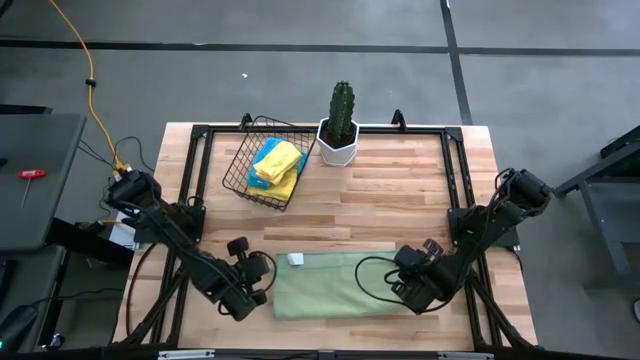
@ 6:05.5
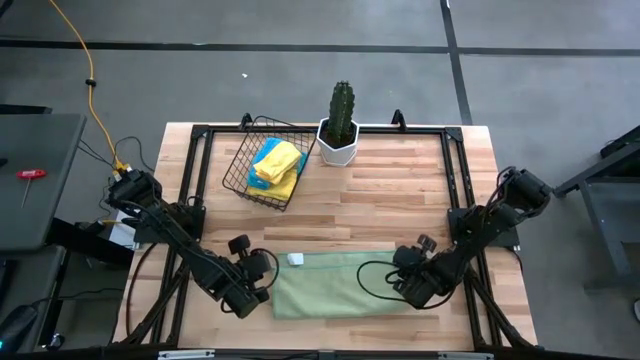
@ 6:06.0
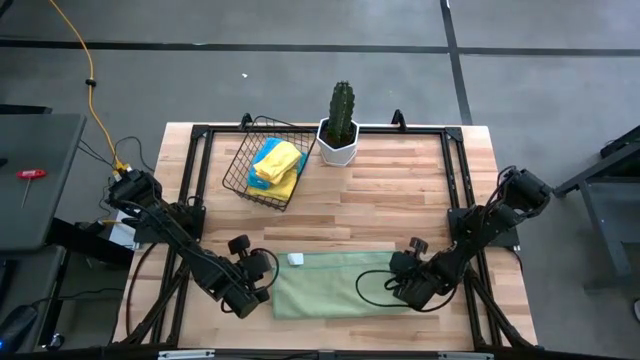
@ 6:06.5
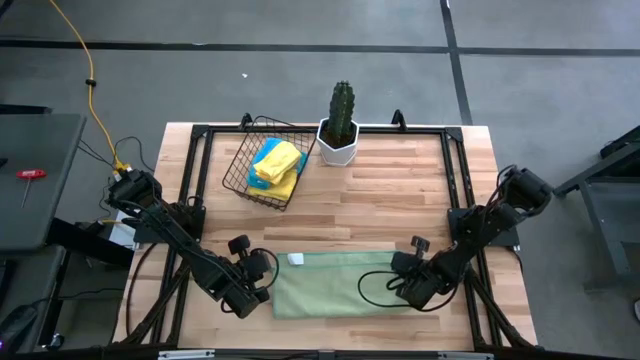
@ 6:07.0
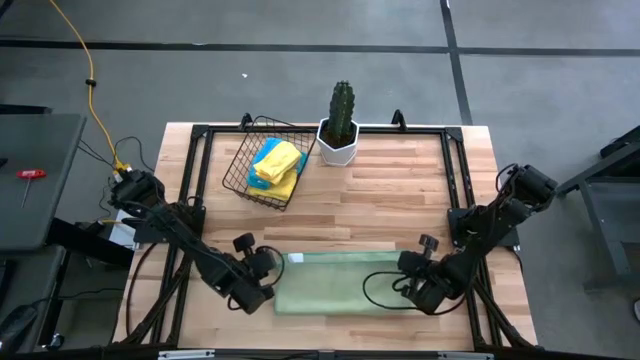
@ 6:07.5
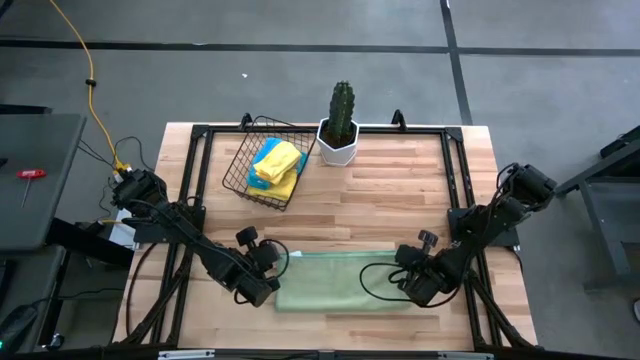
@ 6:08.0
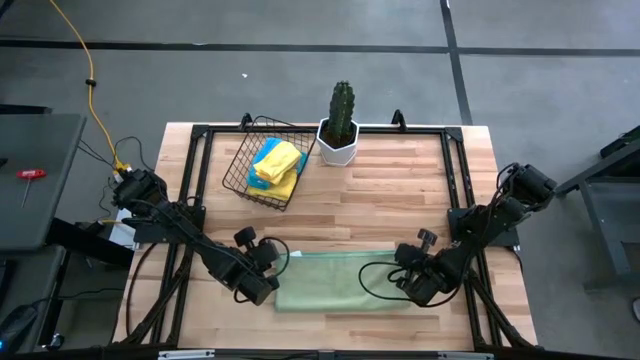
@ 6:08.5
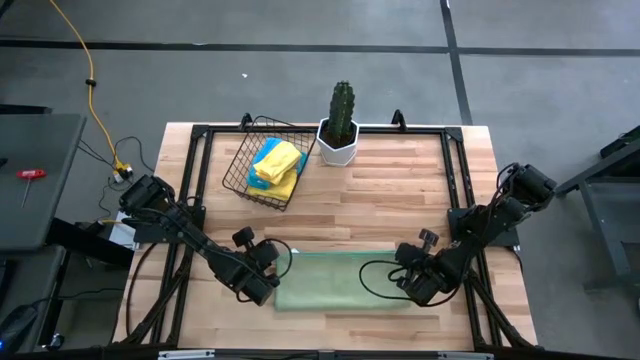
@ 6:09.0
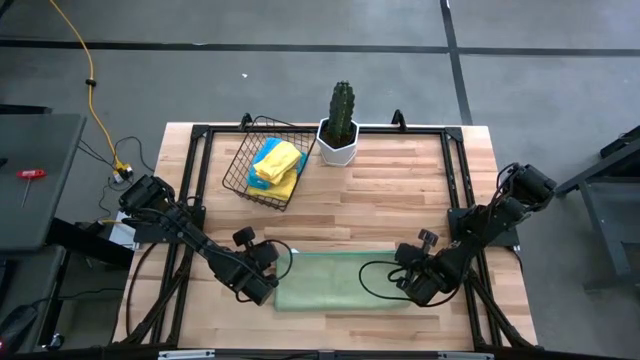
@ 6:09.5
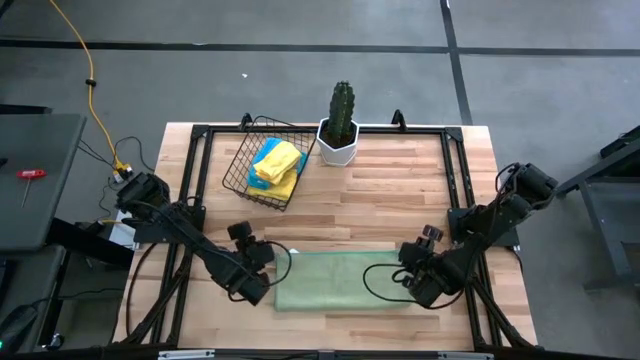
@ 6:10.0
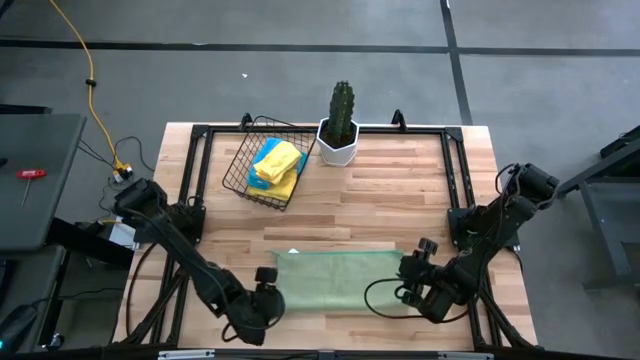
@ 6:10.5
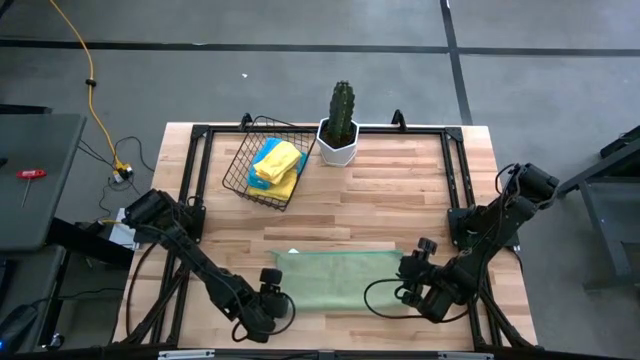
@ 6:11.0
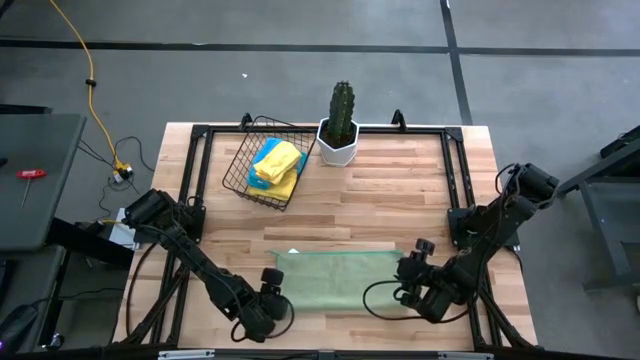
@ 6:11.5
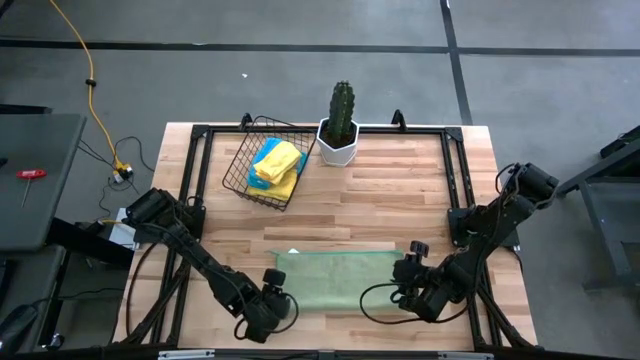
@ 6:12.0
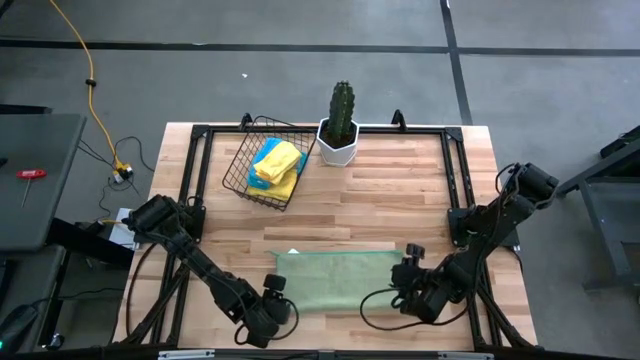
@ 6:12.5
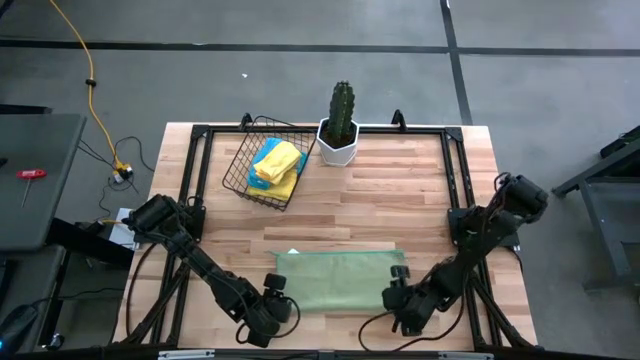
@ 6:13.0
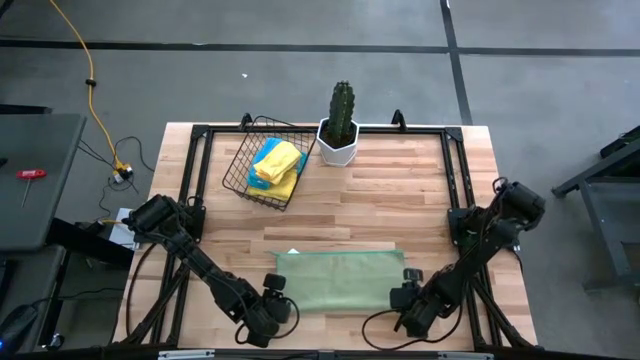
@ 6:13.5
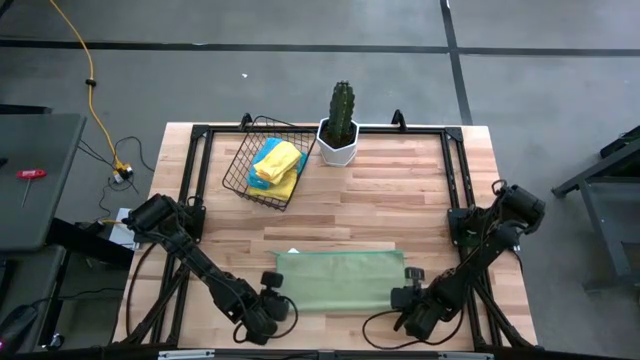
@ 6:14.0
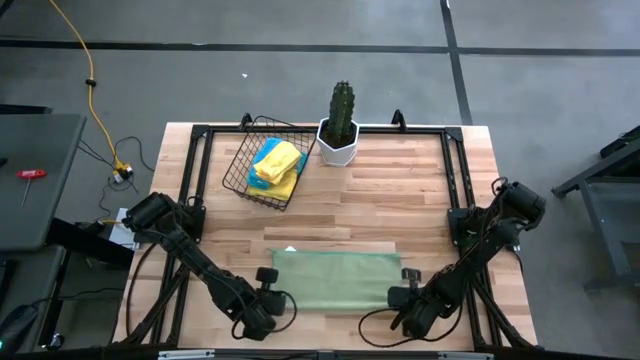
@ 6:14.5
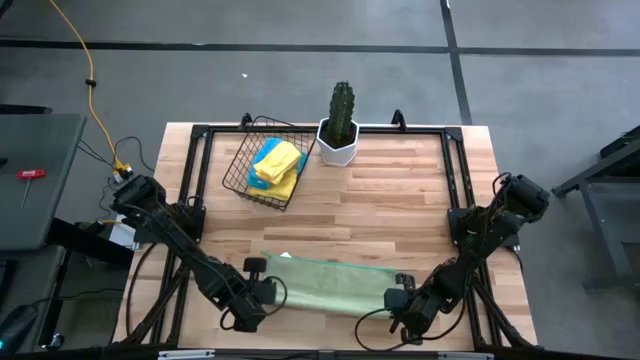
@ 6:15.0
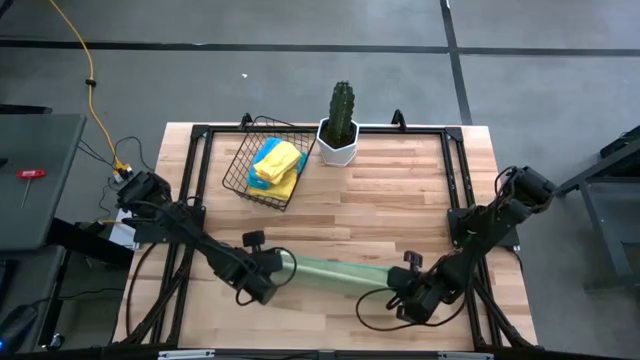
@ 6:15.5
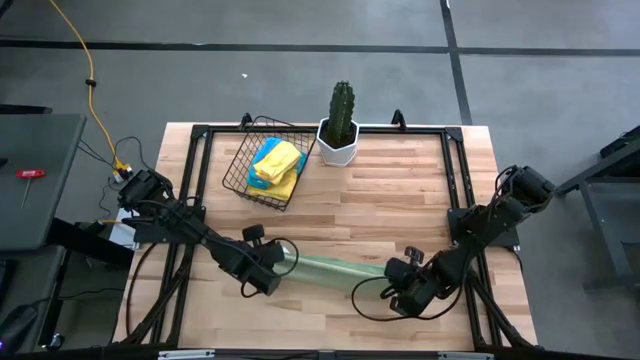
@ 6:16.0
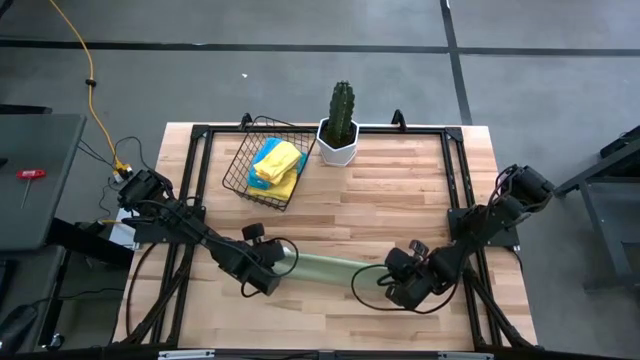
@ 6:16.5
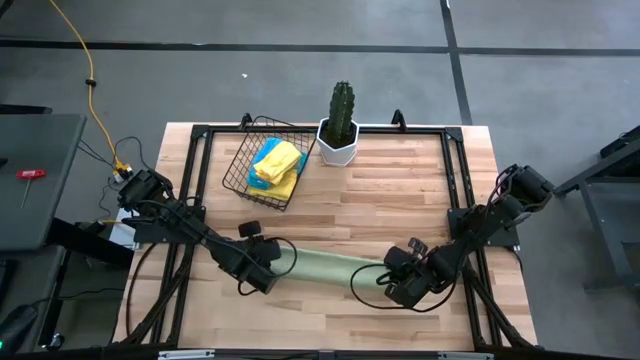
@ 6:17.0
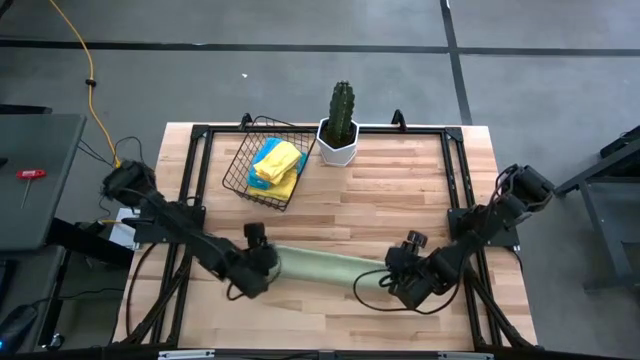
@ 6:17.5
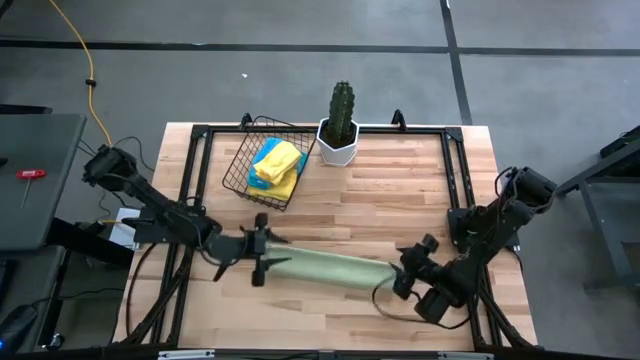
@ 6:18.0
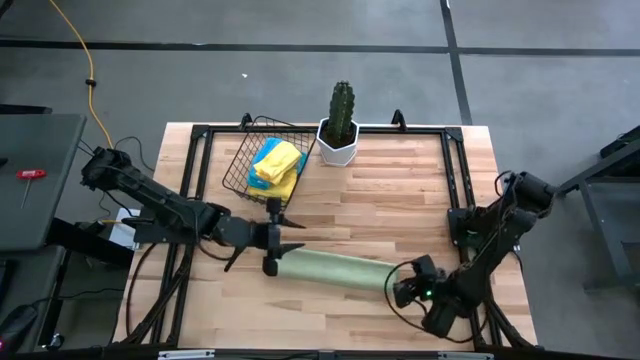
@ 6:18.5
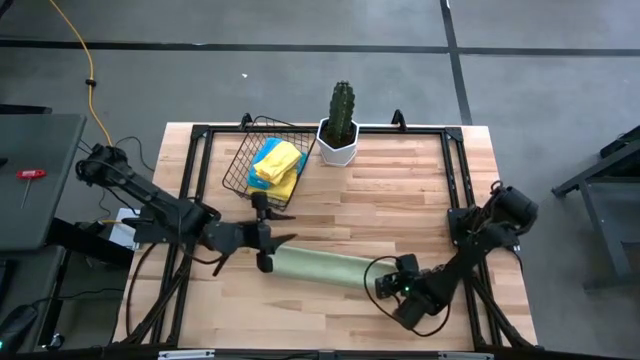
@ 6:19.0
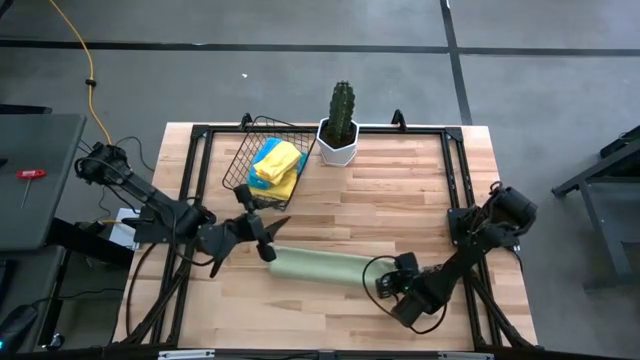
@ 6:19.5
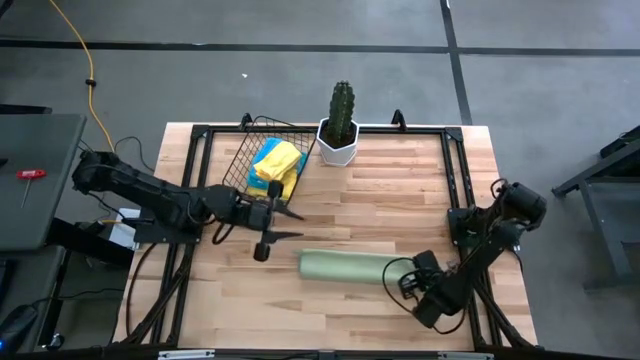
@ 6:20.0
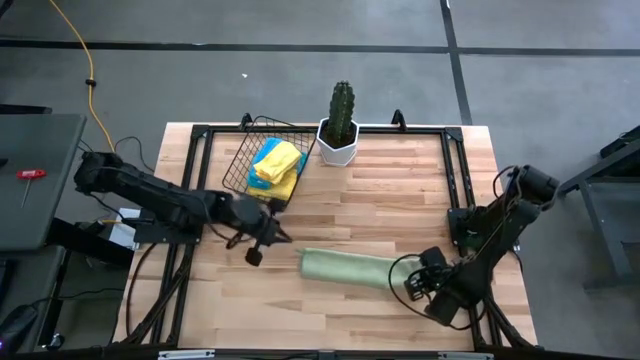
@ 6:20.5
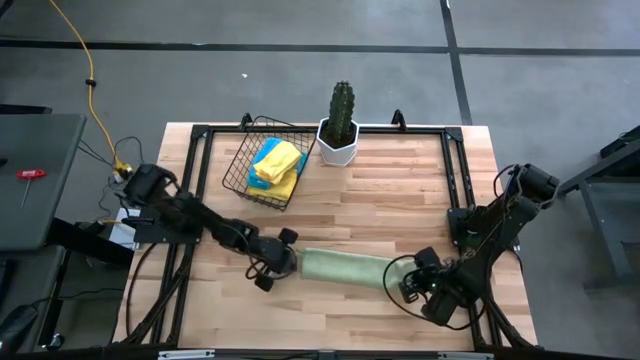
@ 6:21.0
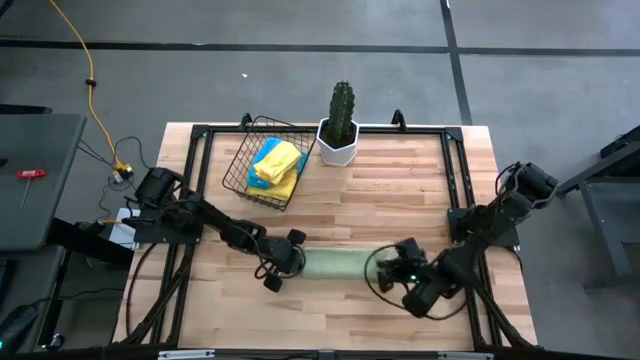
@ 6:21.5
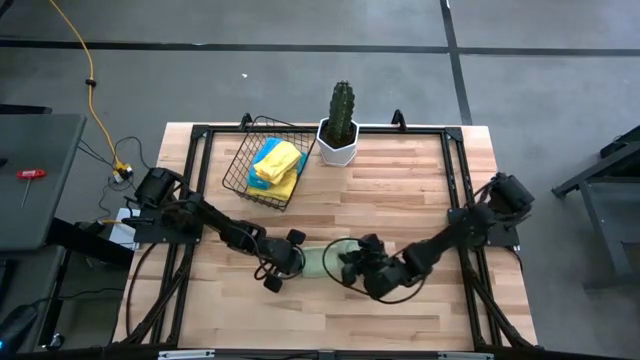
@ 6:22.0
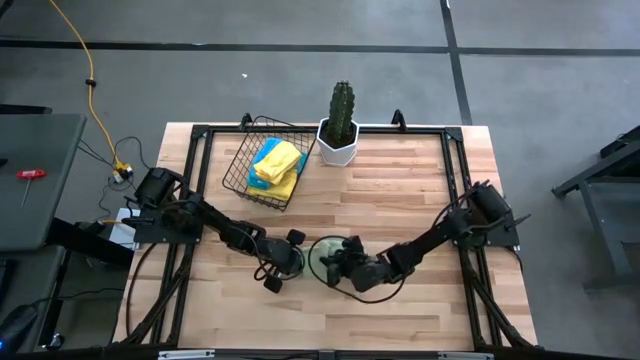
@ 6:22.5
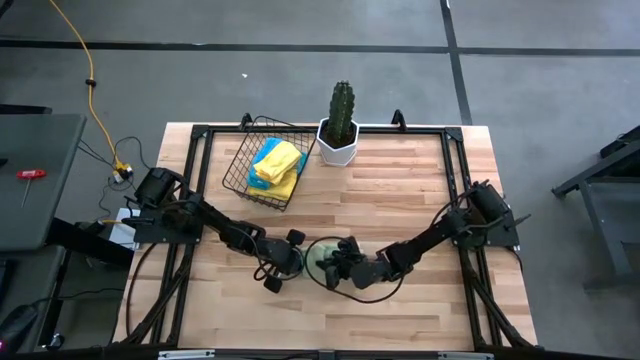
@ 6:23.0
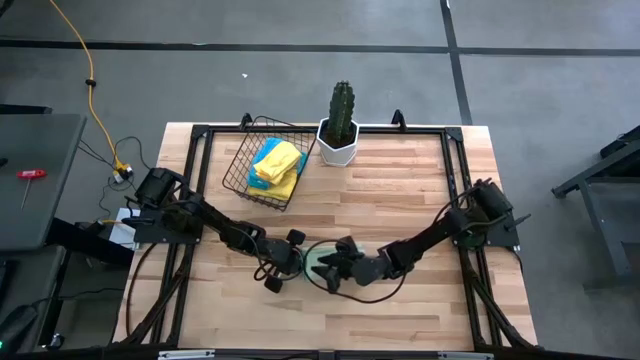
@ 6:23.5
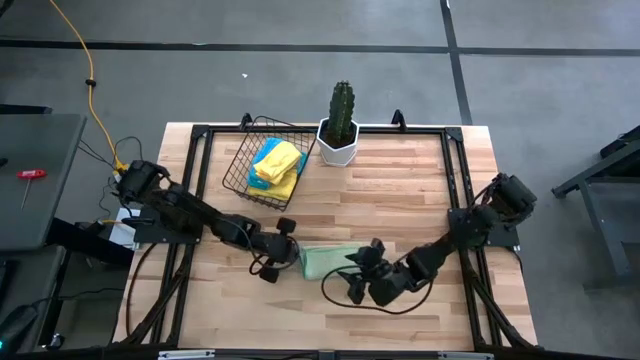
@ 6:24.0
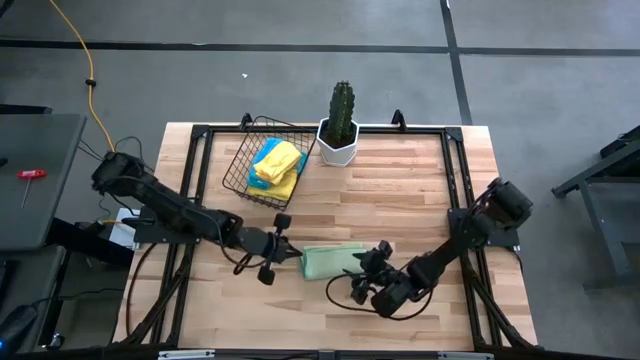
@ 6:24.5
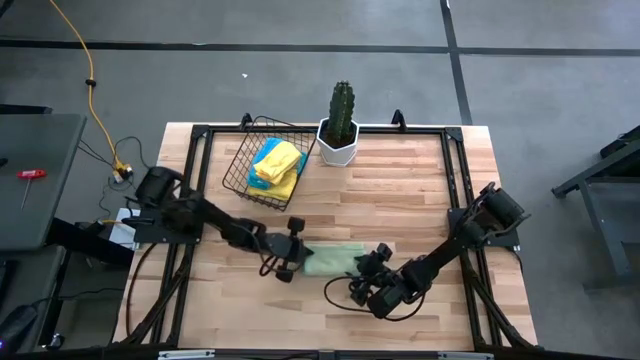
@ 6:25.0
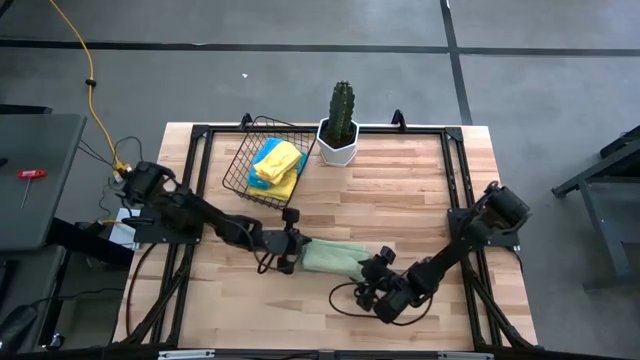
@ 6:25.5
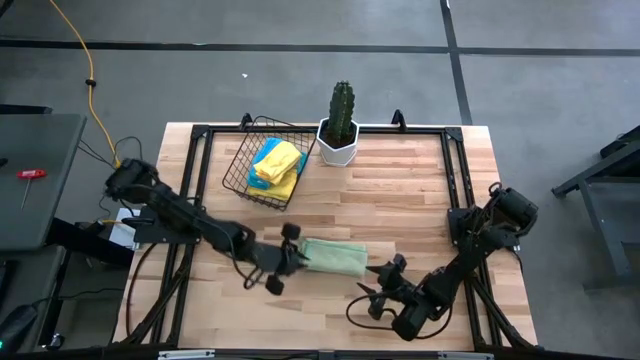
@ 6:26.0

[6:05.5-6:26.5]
Task: Fold microfiber towels
Fold the green microfiber towel on the table

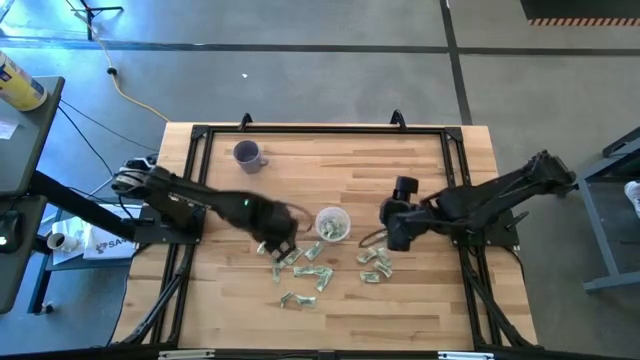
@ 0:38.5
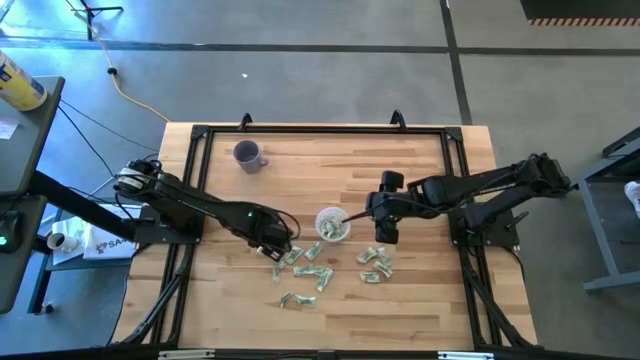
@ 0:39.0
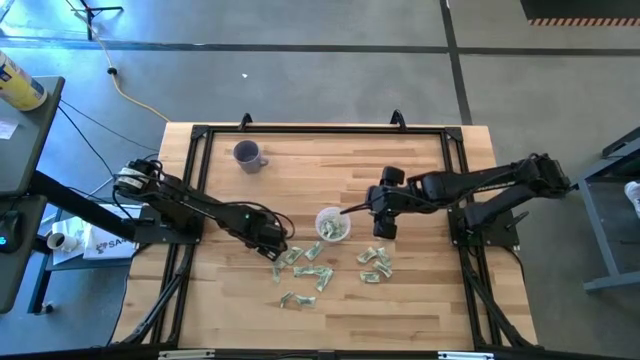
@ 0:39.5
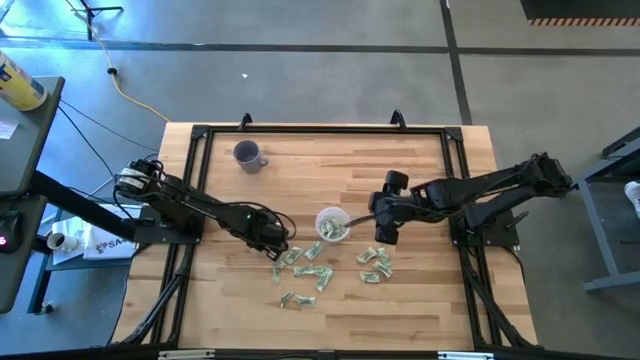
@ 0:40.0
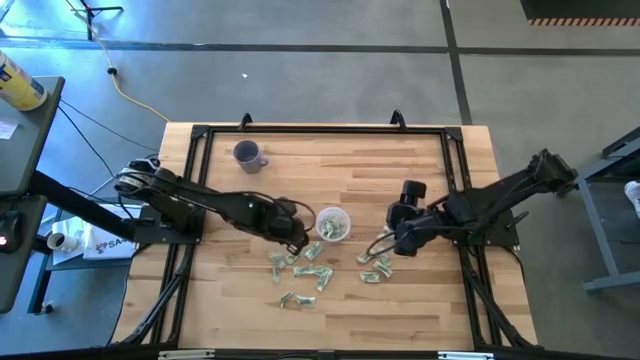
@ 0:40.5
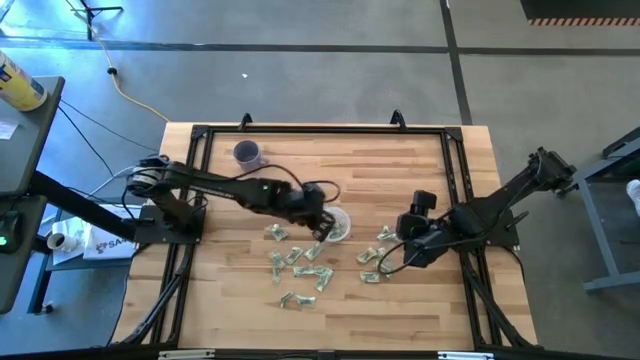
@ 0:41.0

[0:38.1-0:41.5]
Task: Pick and place Stevia / Truvia into bins
Put the stevia packet into the transparent container
